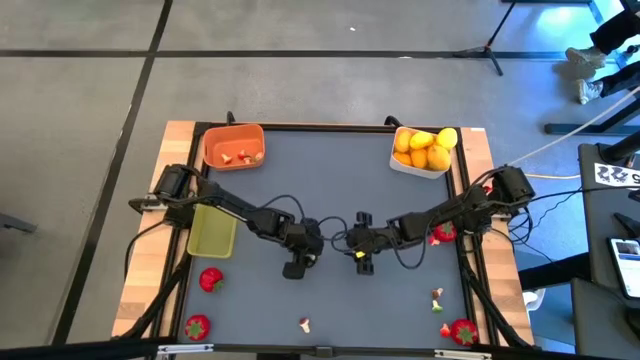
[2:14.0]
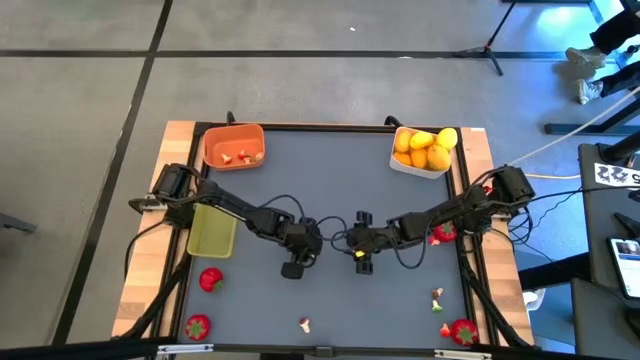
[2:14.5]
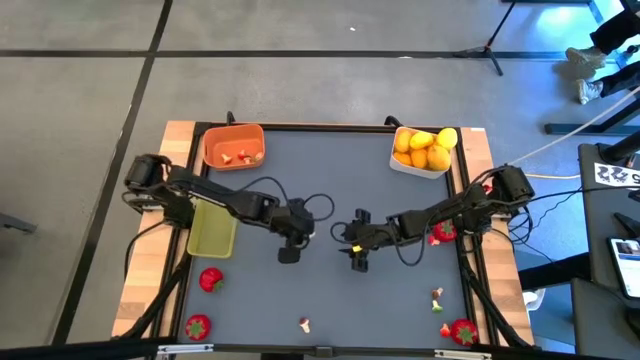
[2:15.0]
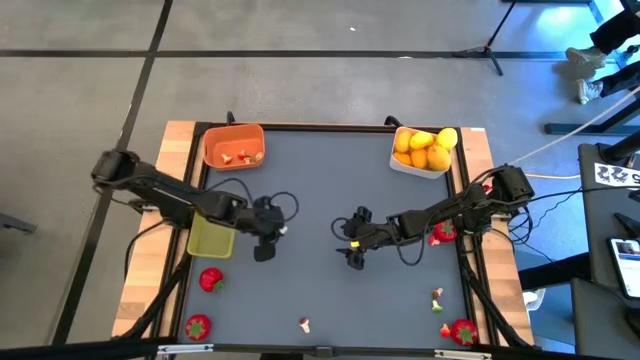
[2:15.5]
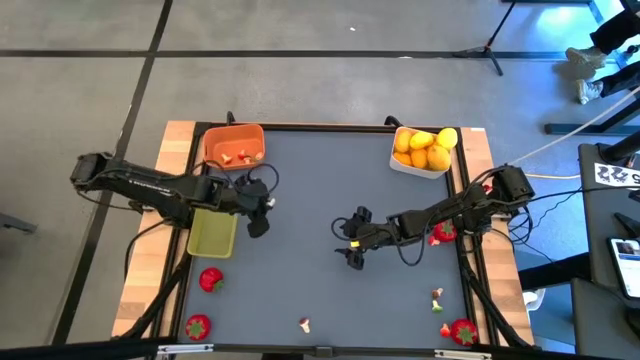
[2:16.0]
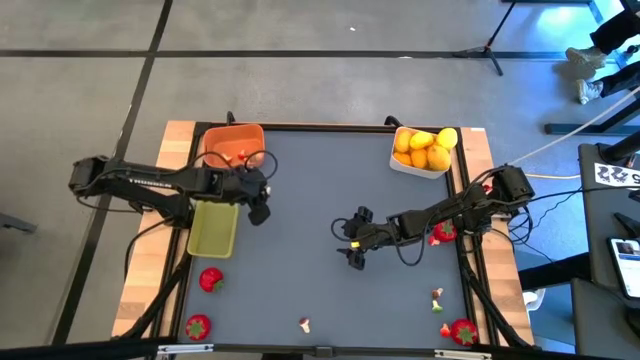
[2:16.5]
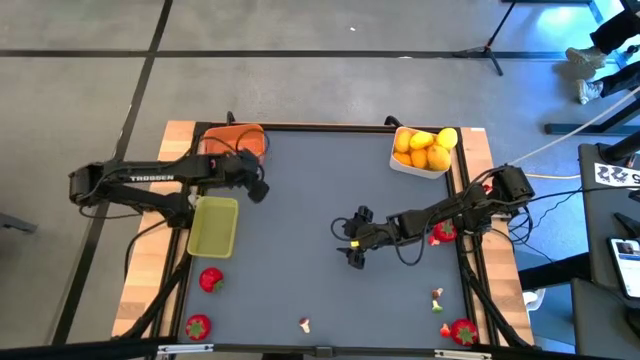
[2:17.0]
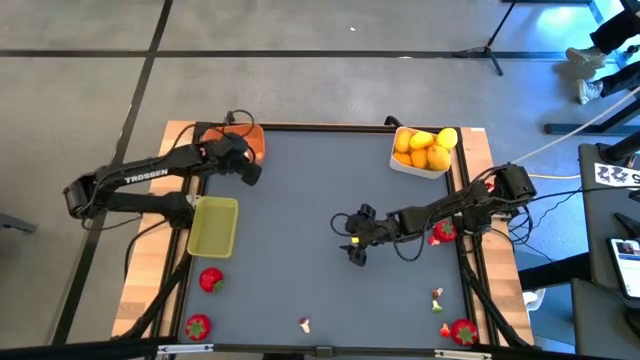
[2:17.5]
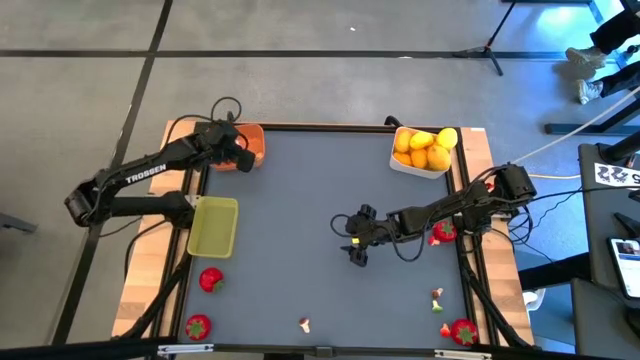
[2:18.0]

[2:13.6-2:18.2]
Task: Sort produce into baskets
Put the green mushroom into the orange bin

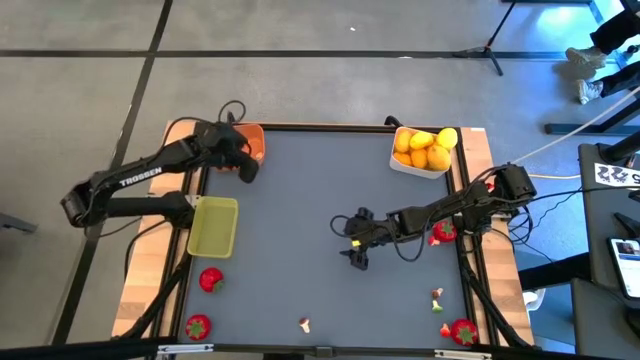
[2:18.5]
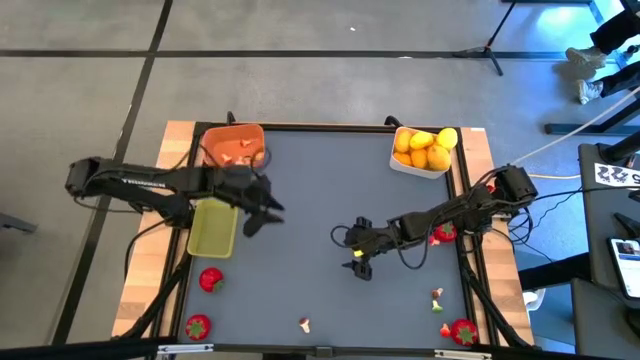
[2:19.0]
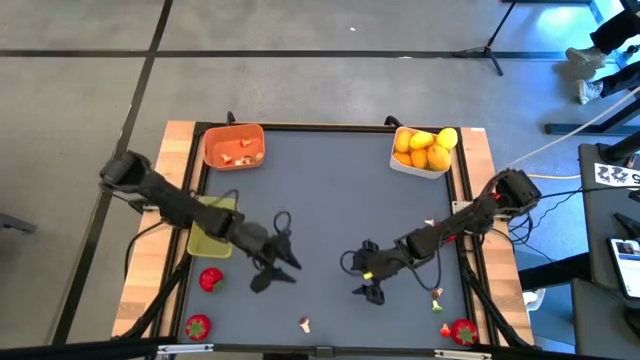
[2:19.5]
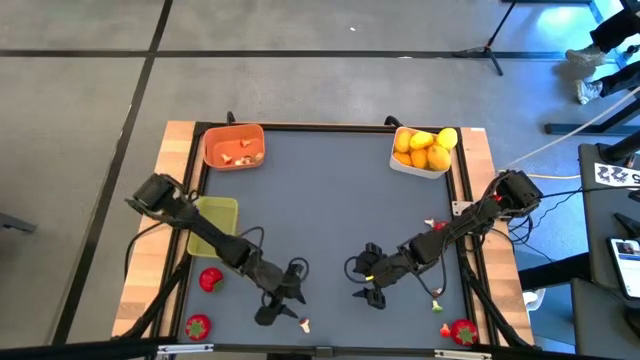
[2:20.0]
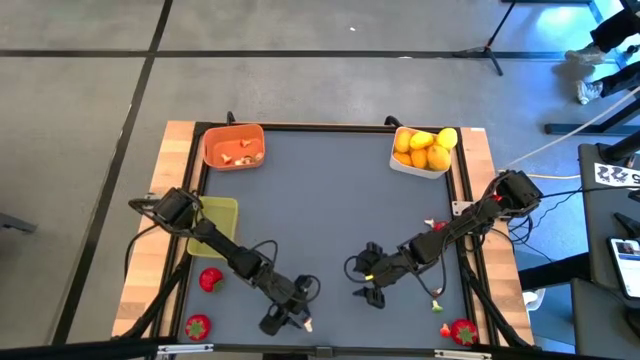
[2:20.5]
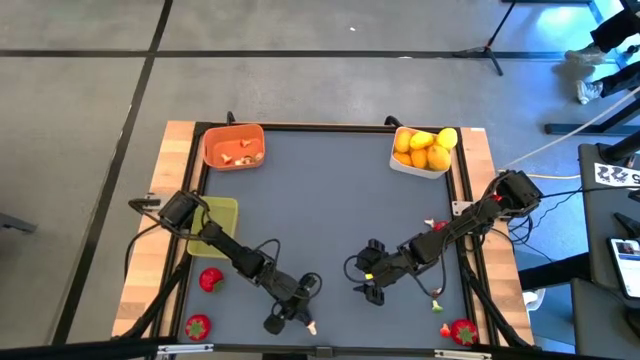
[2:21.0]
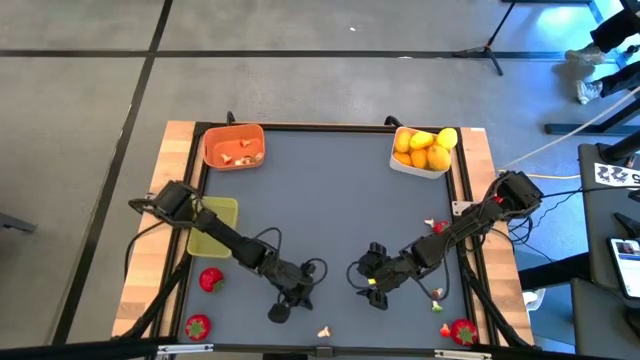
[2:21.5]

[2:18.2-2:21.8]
Put the brown mushroom into the orange bin

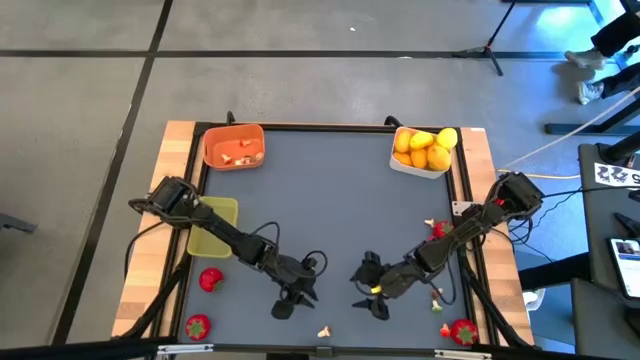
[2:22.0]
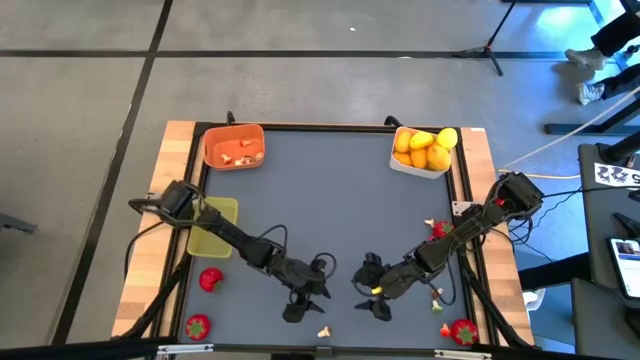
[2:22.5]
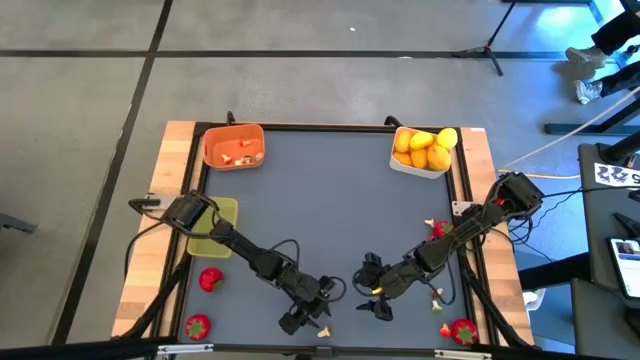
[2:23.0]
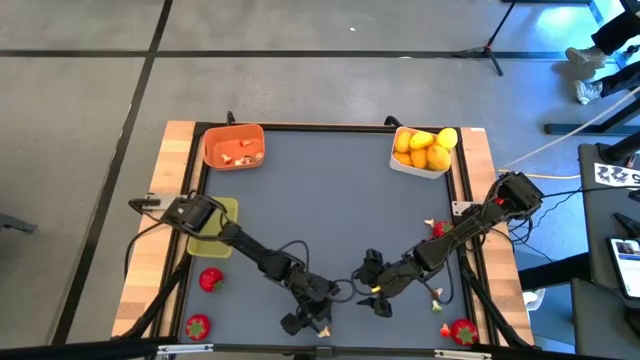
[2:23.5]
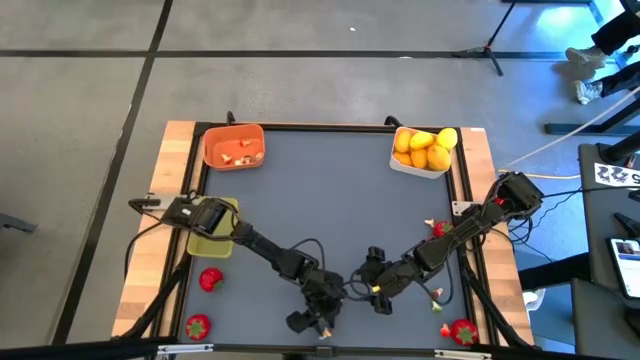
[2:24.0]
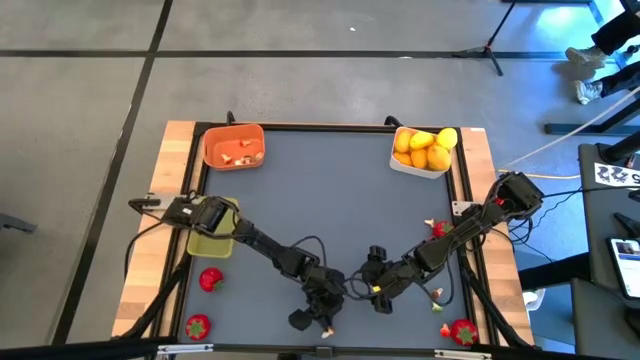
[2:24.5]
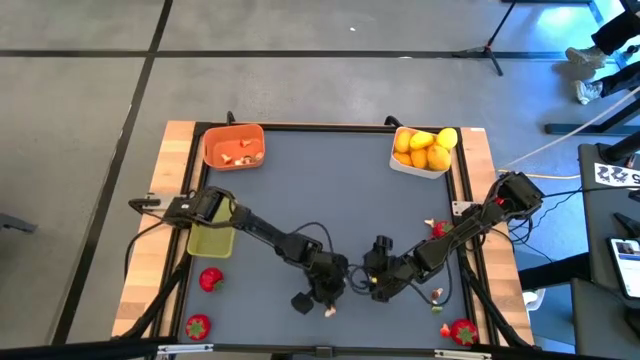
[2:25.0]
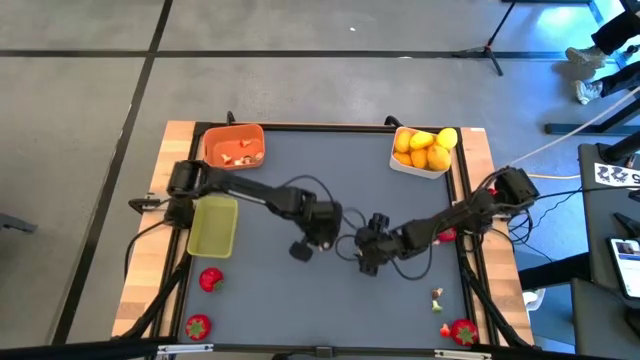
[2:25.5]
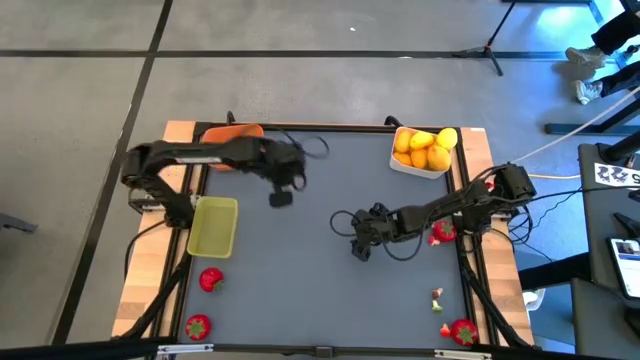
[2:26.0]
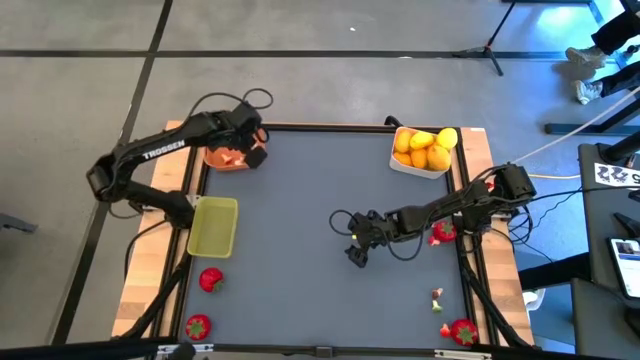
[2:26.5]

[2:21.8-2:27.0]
Put the brown mushroom into the orange bin

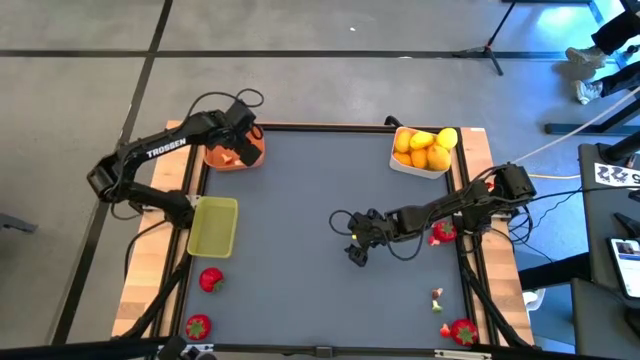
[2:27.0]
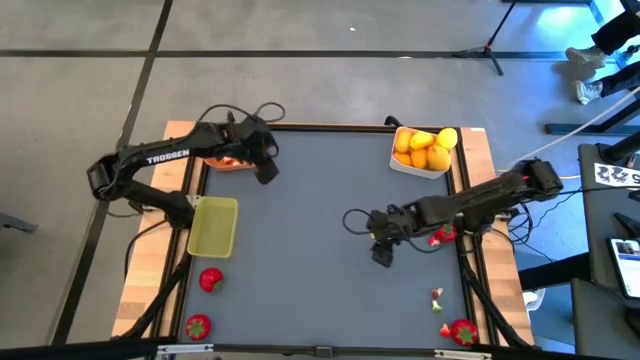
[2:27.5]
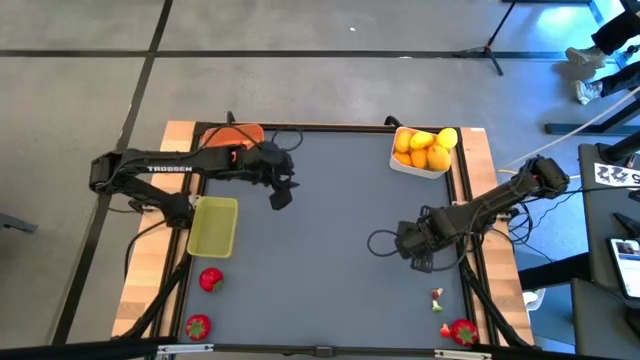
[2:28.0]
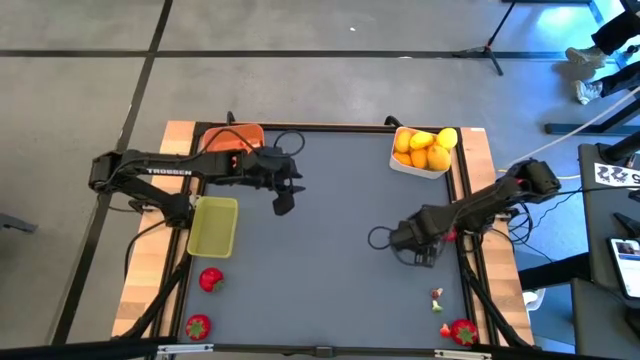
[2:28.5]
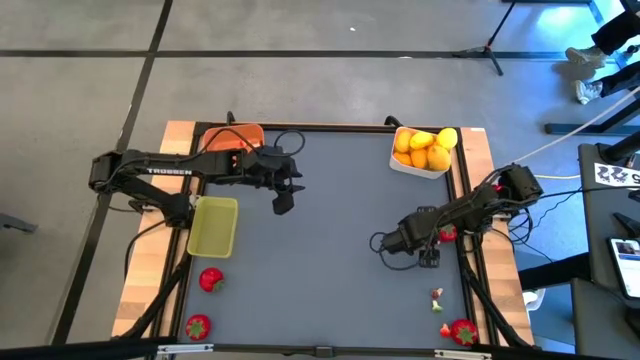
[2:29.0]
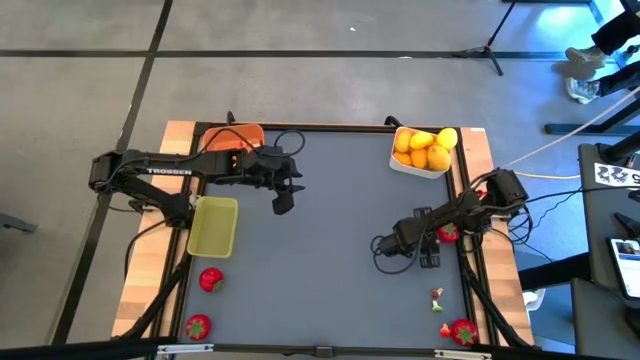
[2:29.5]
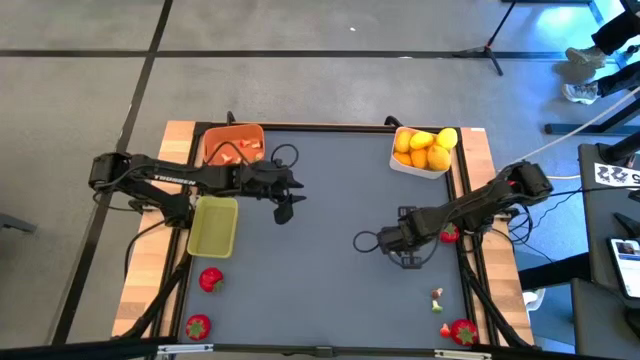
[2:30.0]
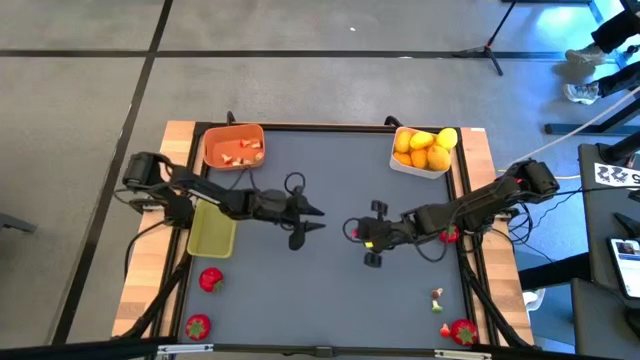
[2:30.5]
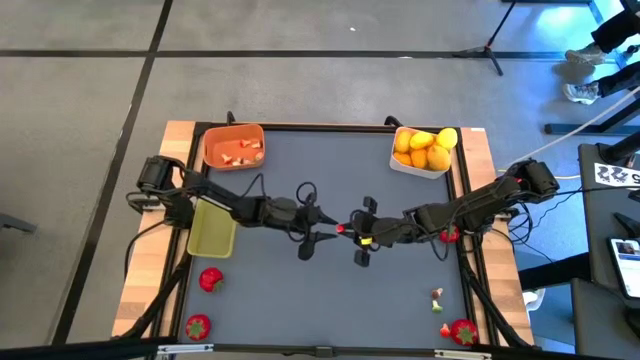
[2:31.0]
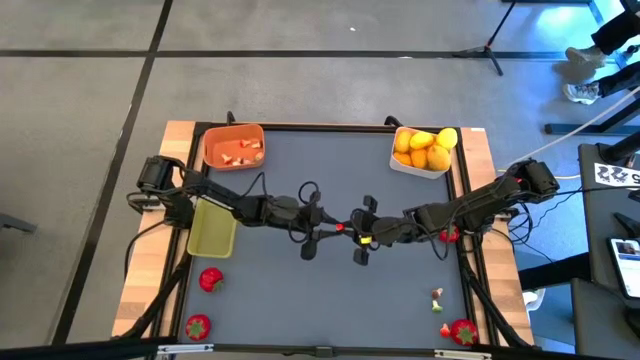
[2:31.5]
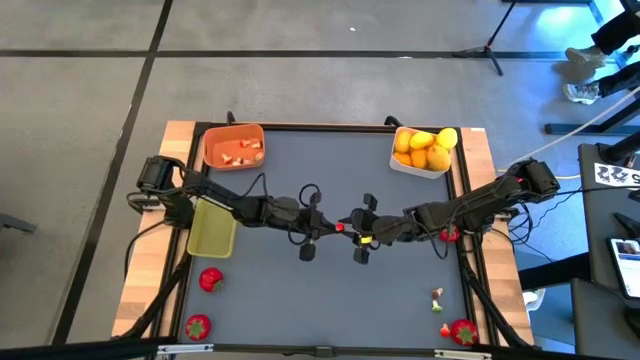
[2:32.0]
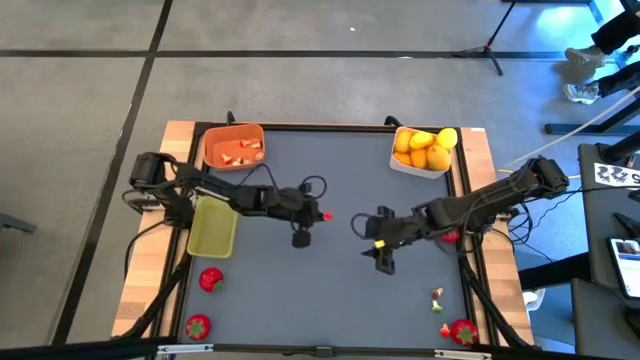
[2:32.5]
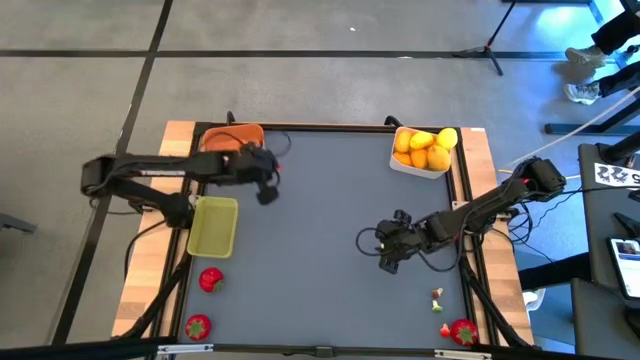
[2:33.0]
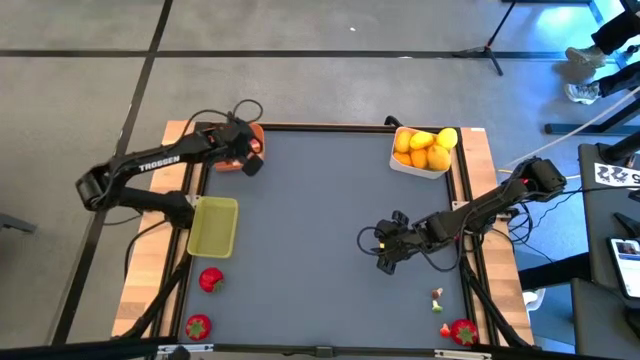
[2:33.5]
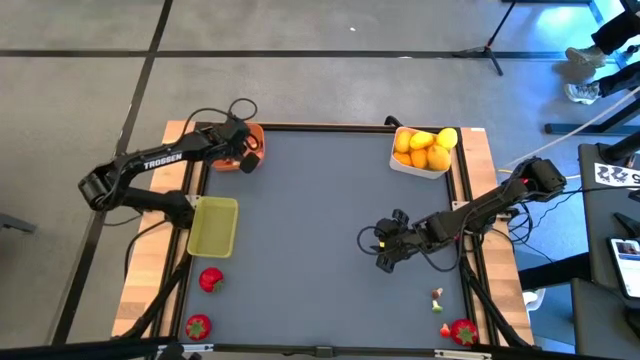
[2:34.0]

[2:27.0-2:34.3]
Put the red mushroom into the orange bin

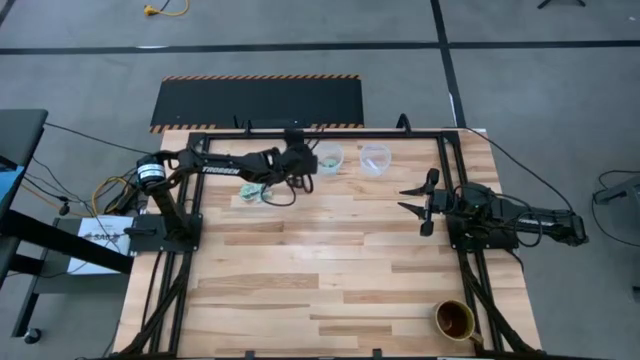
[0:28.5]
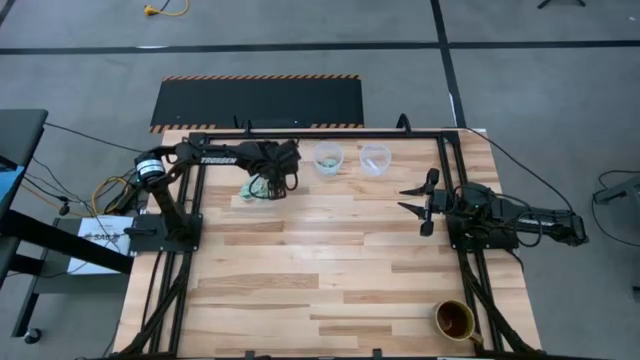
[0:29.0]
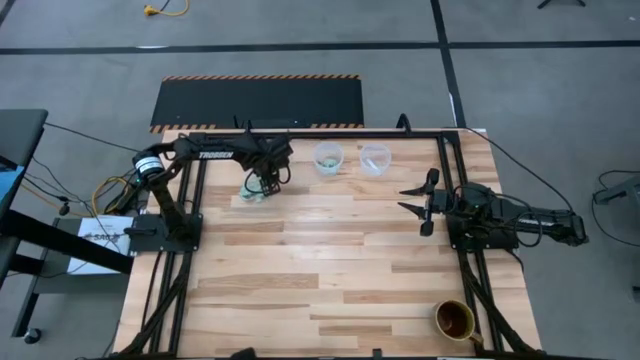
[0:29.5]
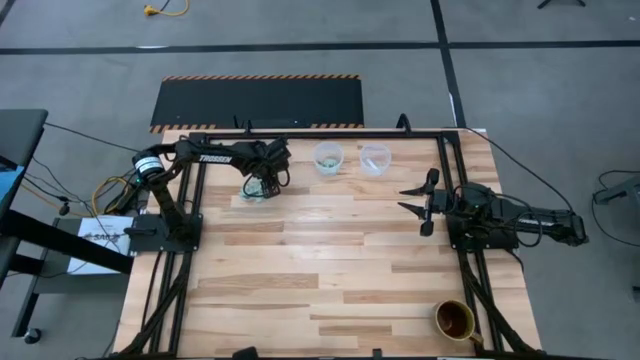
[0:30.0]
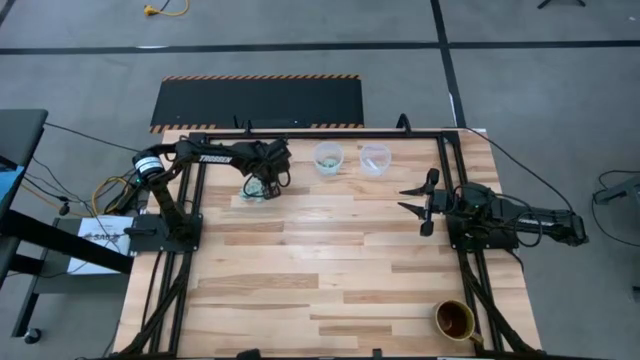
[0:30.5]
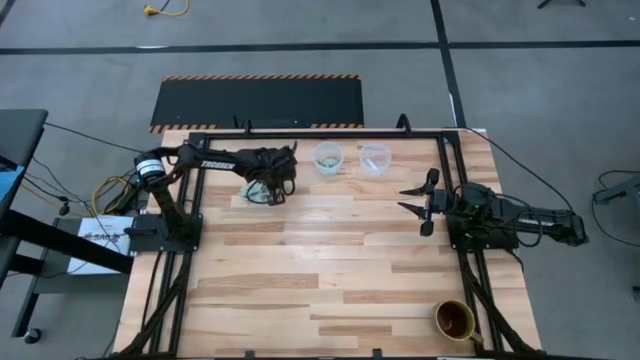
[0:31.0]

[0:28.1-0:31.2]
Task: Pick and place Stevia / Truvia into bins
Put the stevia packet into the left transparent container
